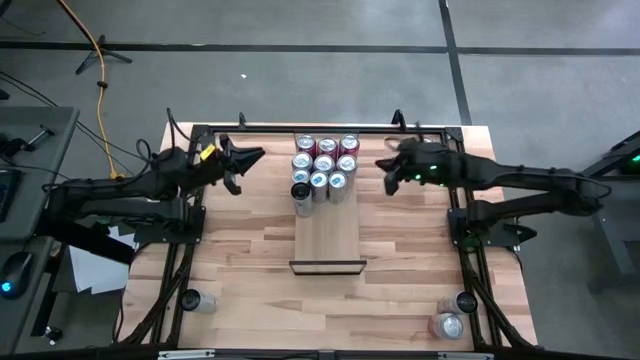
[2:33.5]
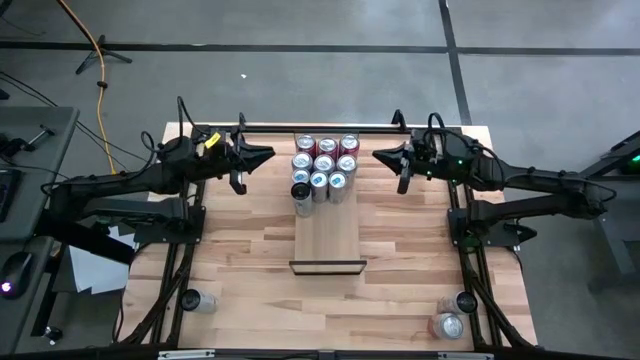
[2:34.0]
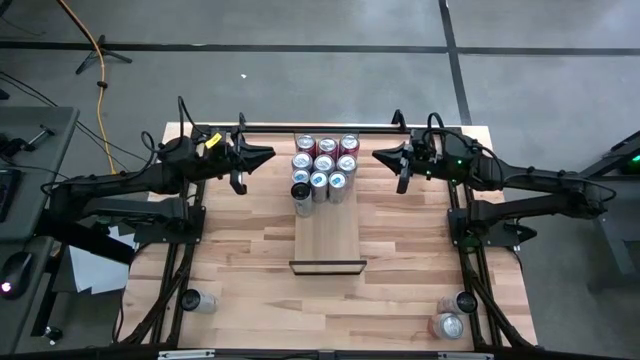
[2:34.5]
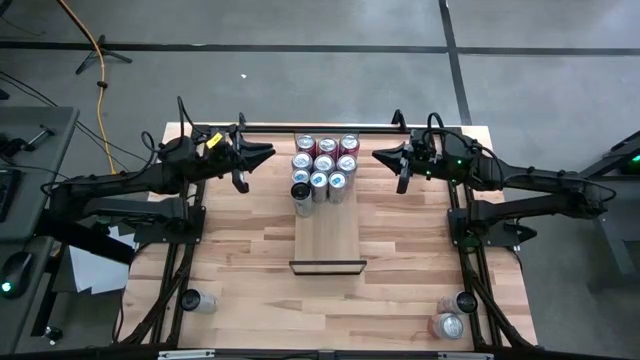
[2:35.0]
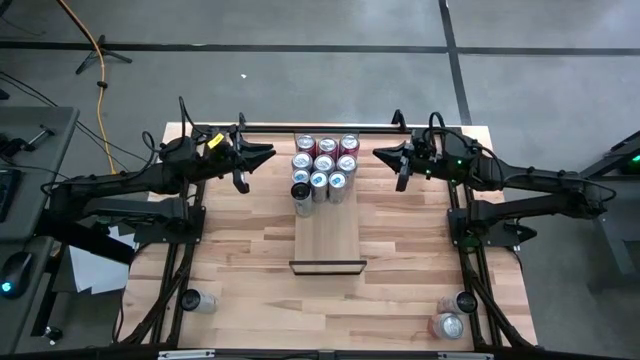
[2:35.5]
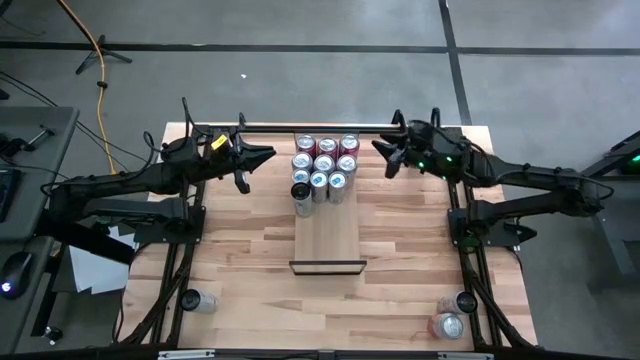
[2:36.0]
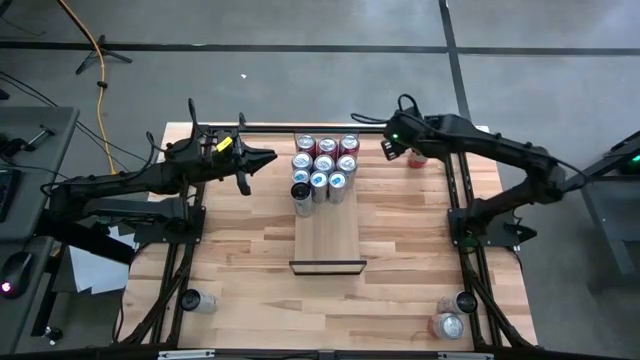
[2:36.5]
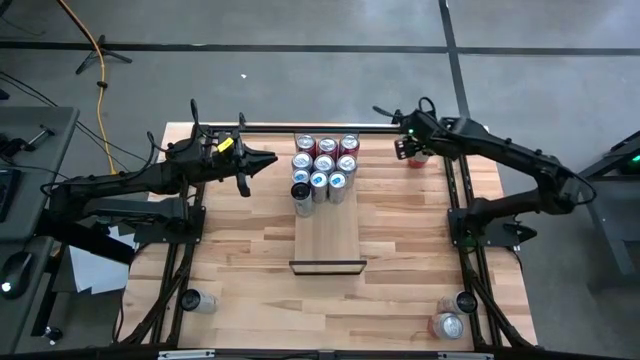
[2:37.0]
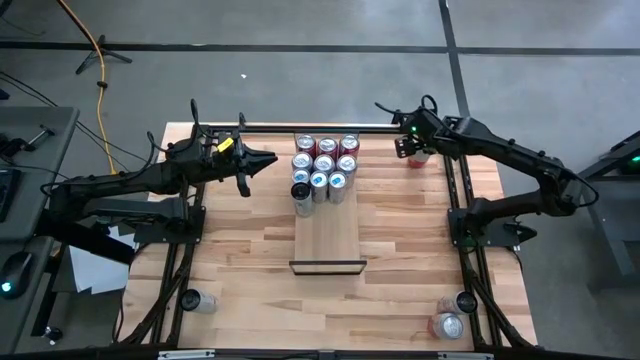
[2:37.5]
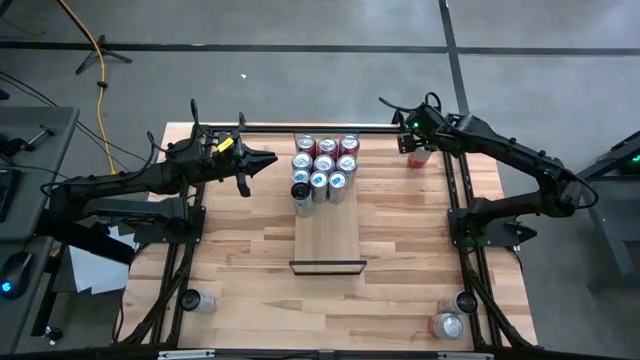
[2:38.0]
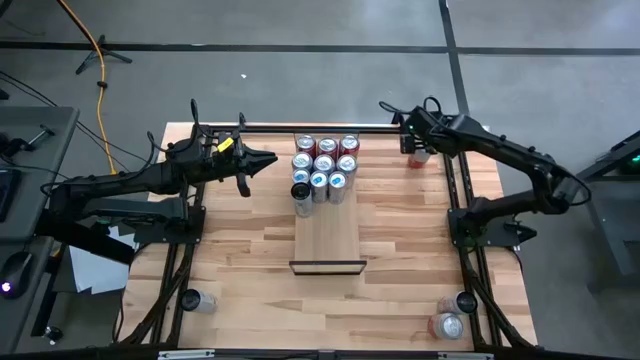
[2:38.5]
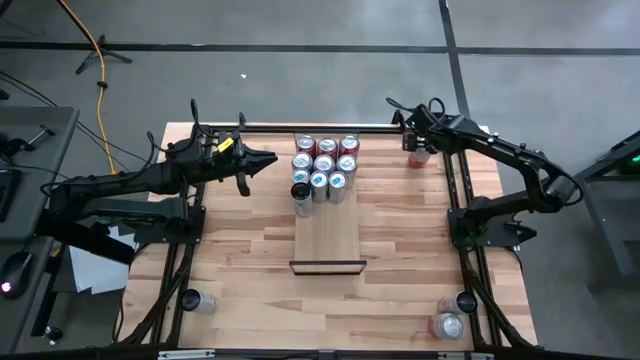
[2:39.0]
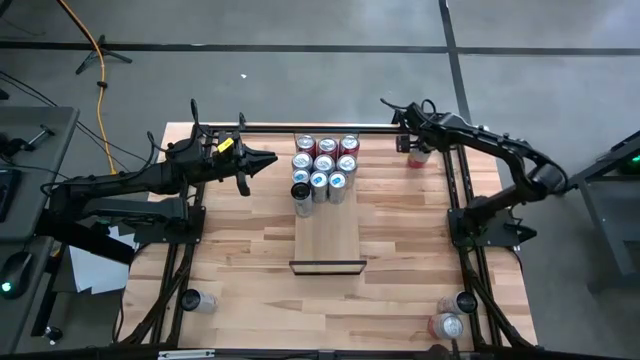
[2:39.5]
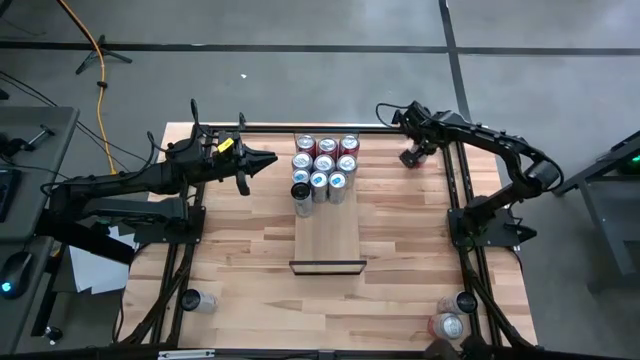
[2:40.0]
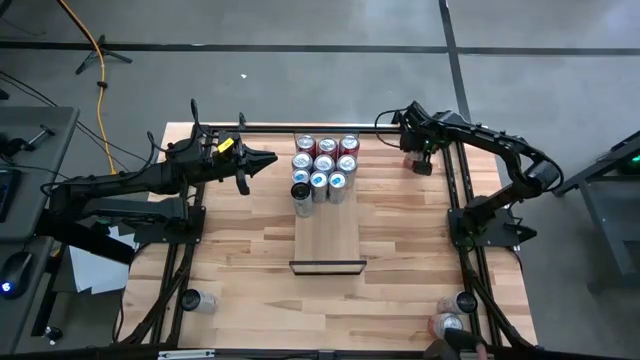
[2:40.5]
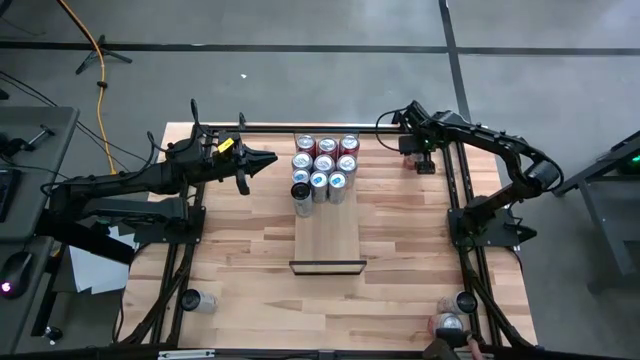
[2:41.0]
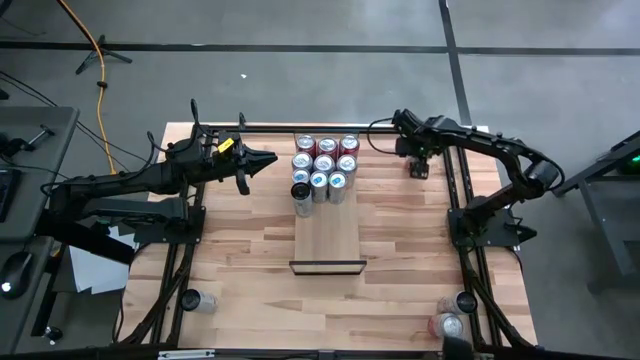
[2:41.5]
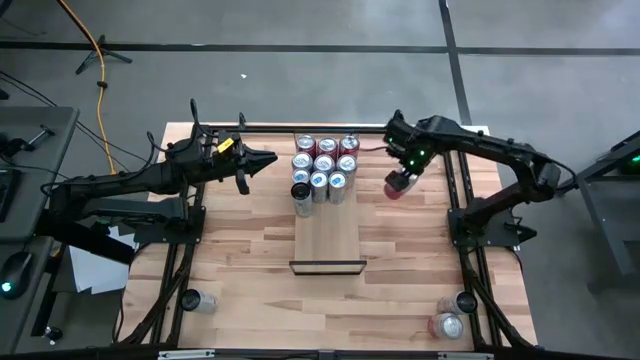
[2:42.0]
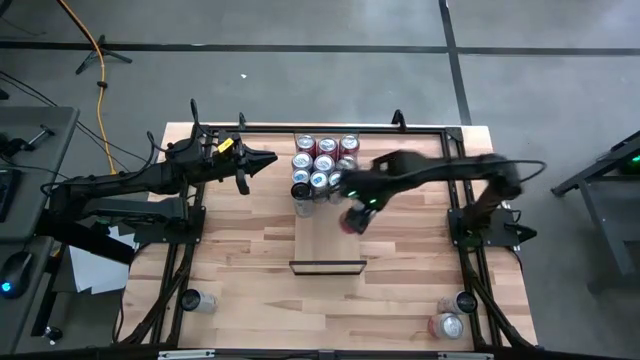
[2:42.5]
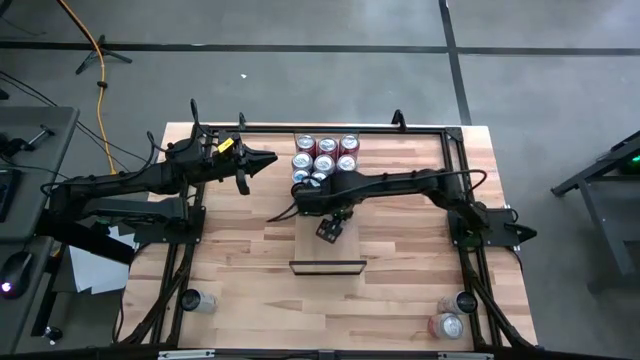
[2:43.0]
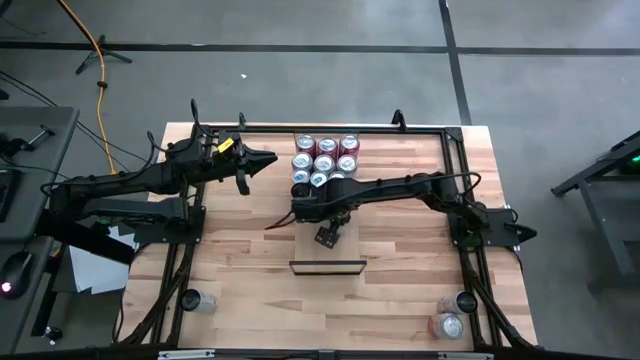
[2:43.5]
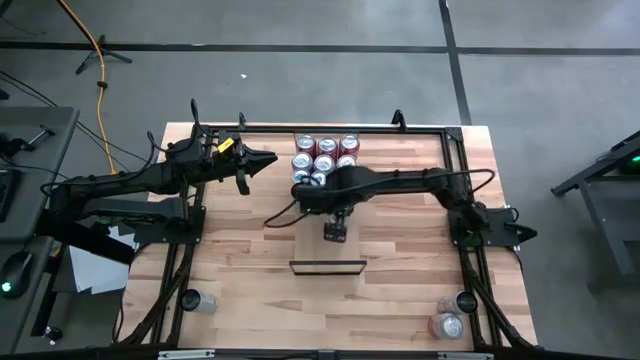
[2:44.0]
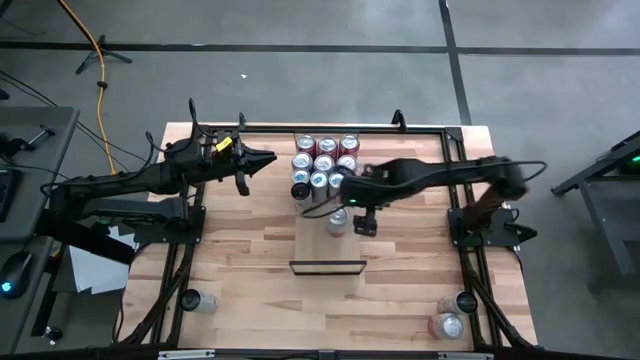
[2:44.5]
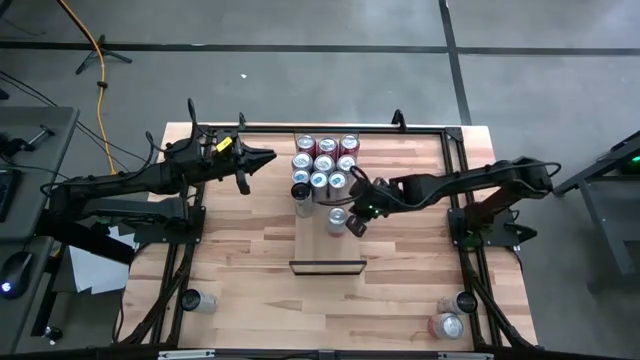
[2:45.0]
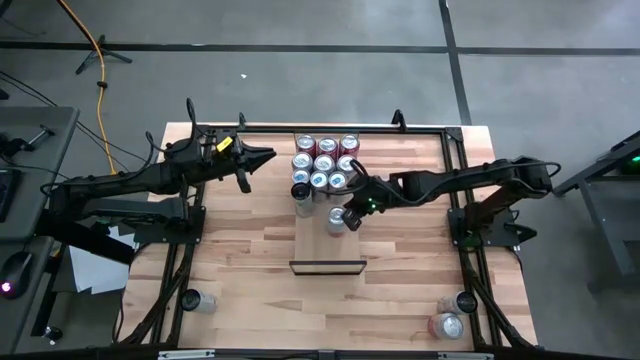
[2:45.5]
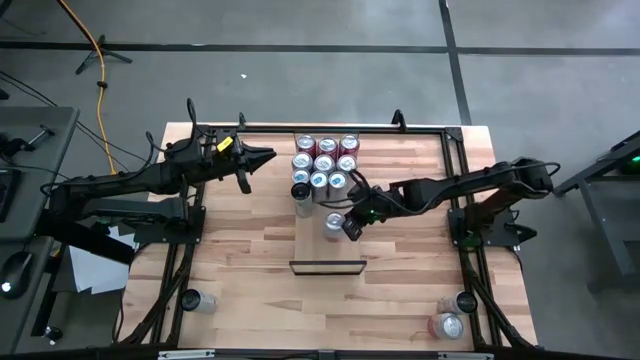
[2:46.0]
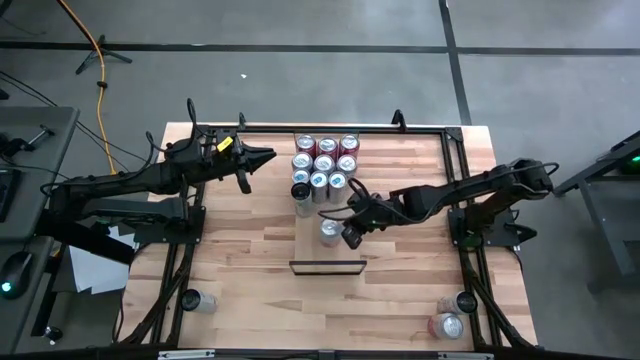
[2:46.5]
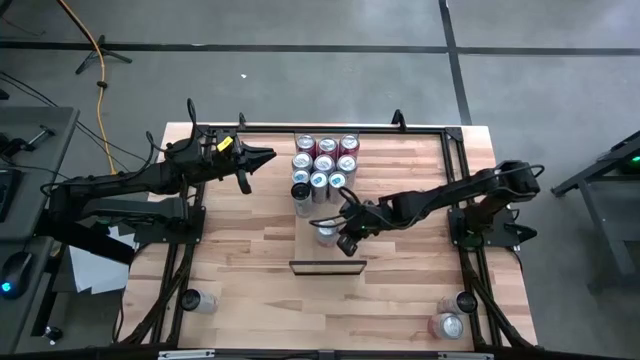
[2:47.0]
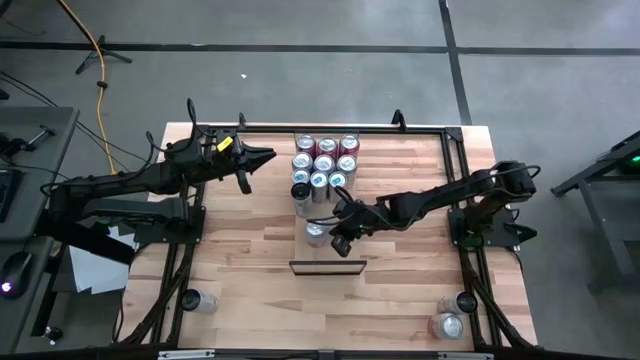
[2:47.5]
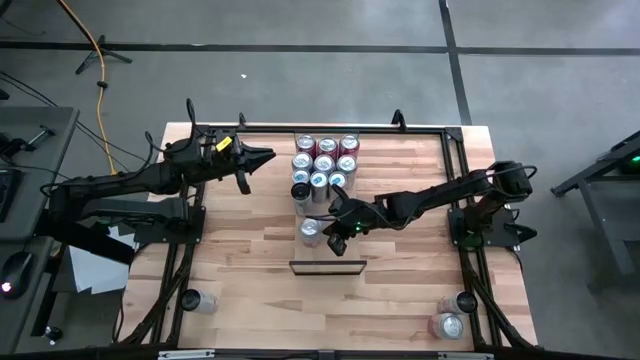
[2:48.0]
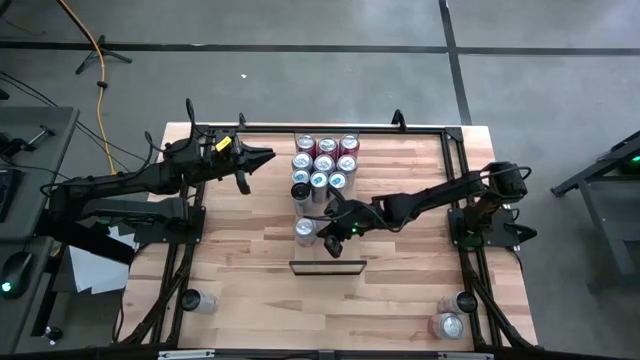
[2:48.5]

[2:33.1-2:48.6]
Task: Place canned beverage on shelf
Put the top pink soda can on the shelf

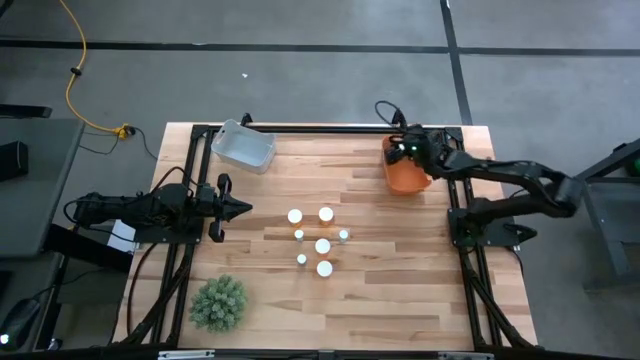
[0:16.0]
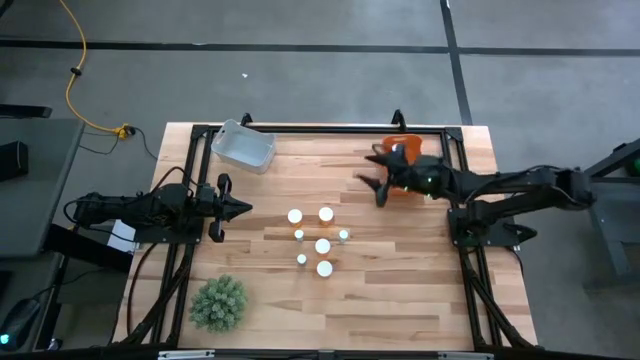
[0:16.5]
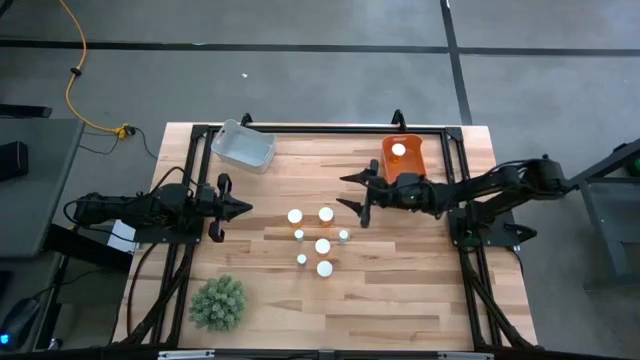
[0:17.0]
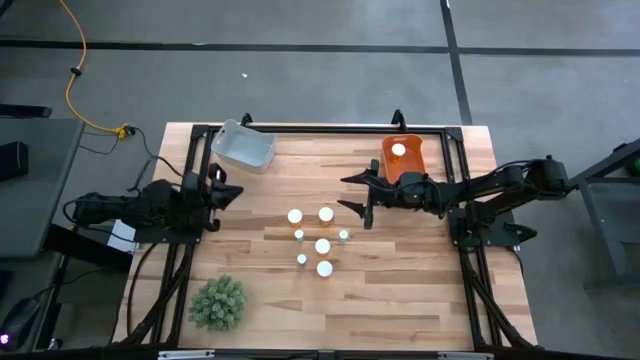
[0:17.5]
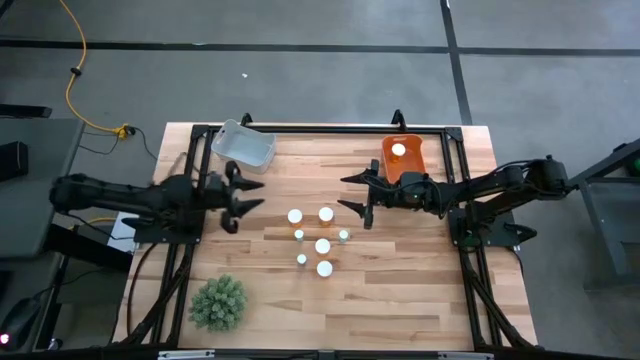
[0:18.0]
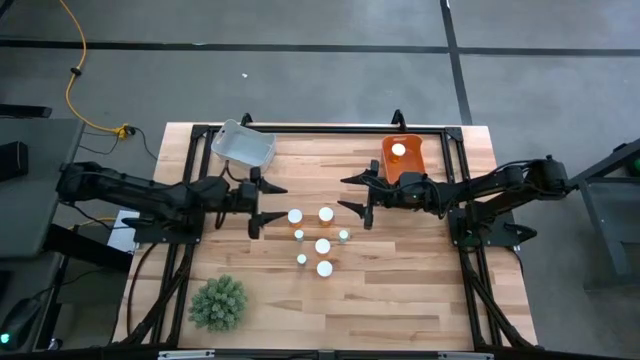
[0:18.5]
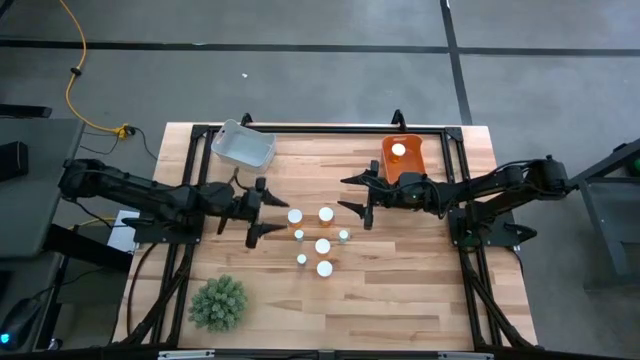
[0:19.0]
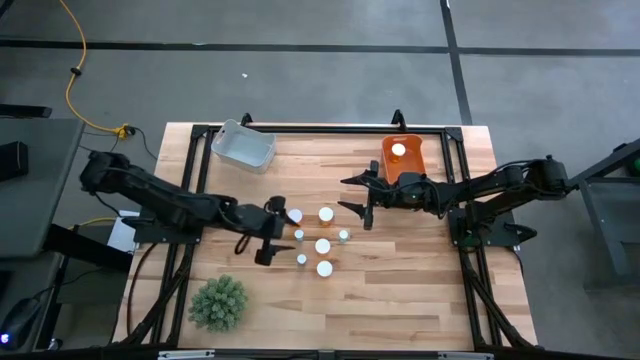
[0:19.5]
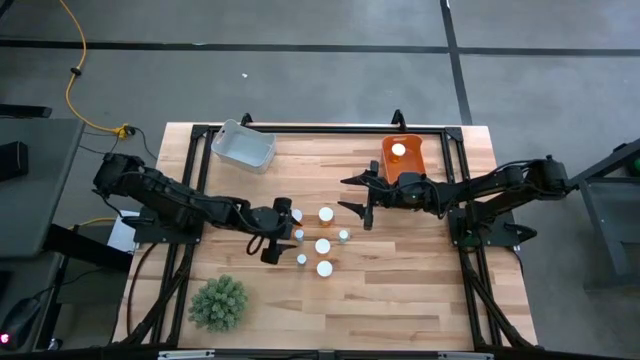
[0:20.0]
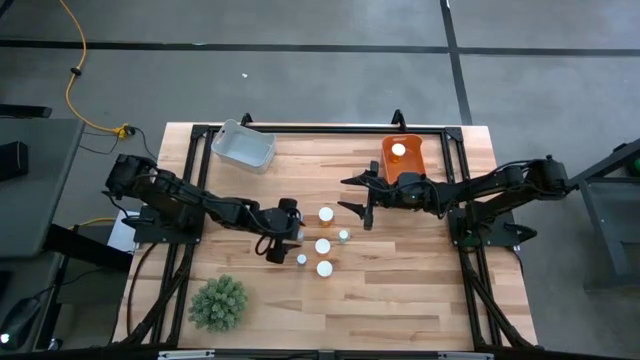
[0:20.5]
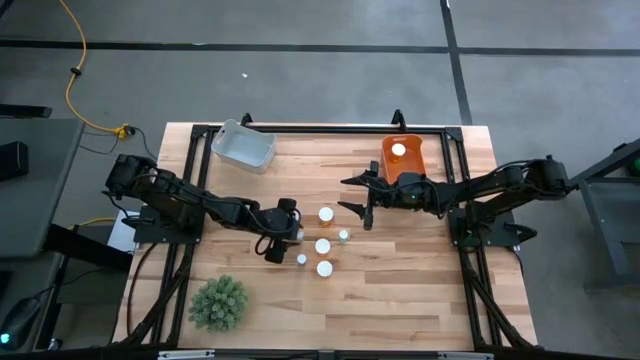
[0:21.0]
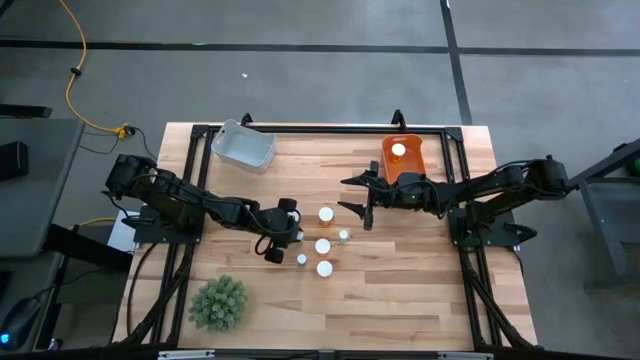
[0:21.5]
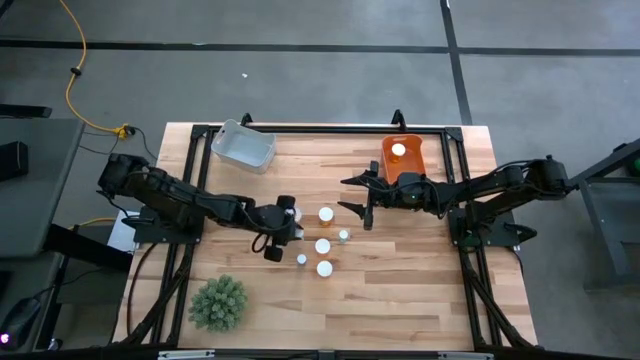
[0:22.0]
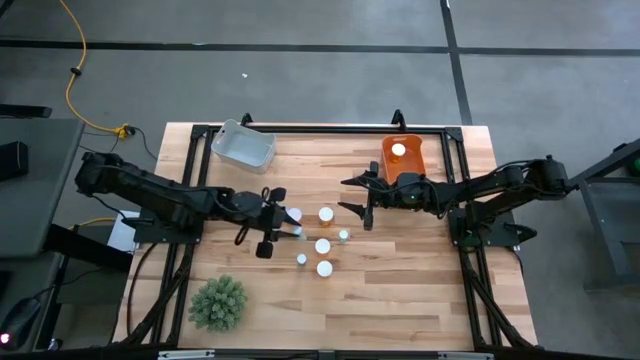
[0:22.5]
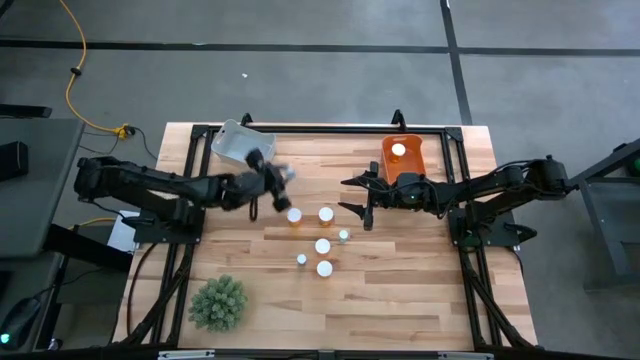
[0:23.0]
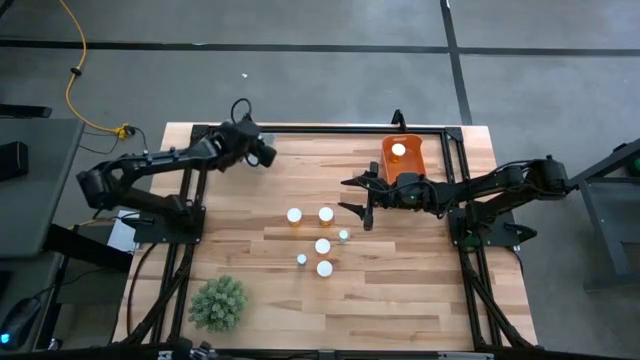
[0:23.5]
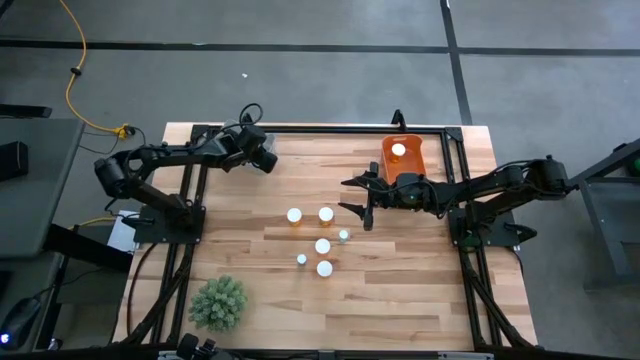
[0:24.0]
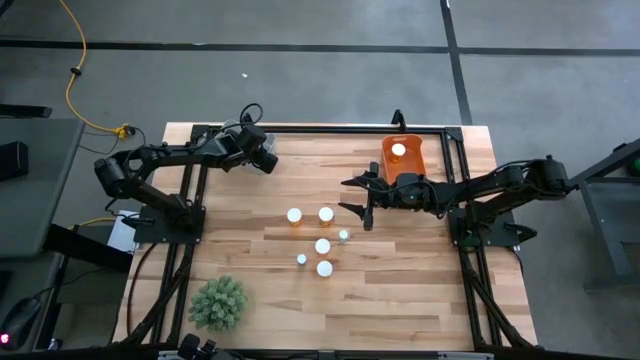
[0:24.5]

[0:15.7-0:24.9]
Task: Pick and place medicine bottles into bin by pill shape (circle, oval)
Put the top left blue tablet bottle into the gray bin
